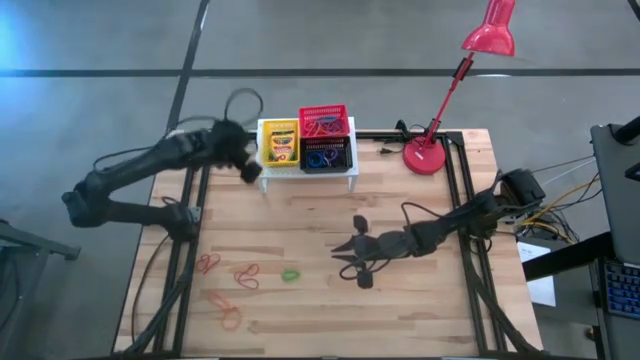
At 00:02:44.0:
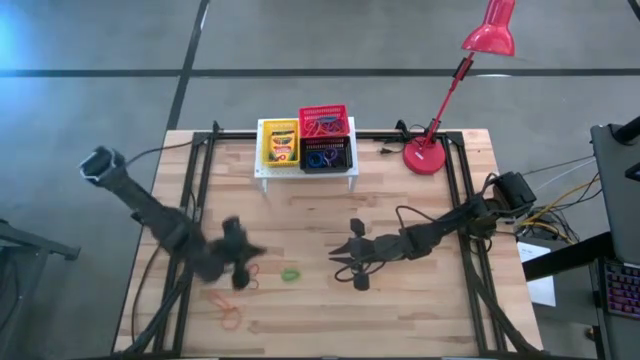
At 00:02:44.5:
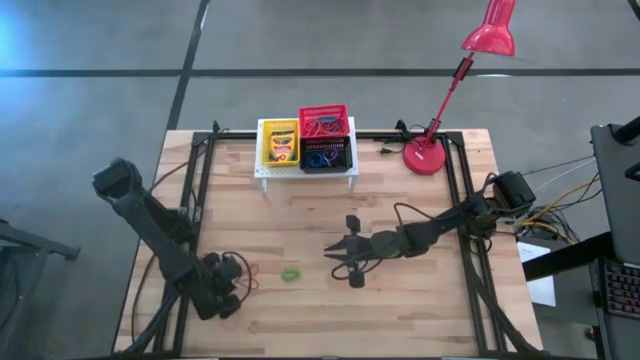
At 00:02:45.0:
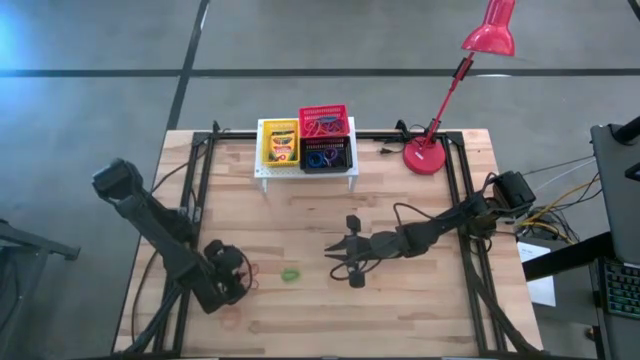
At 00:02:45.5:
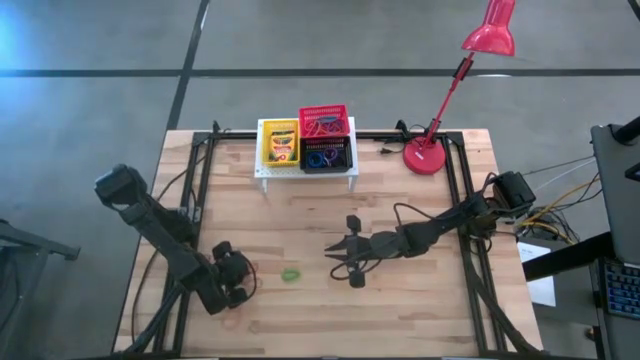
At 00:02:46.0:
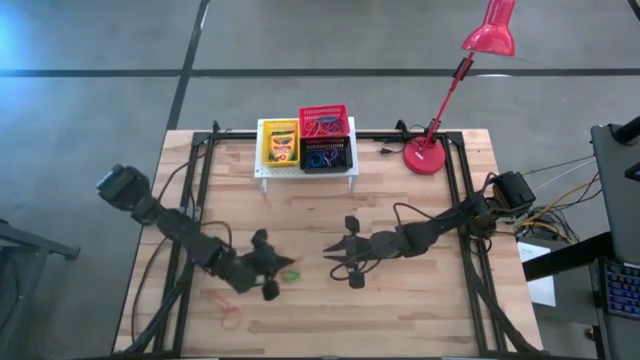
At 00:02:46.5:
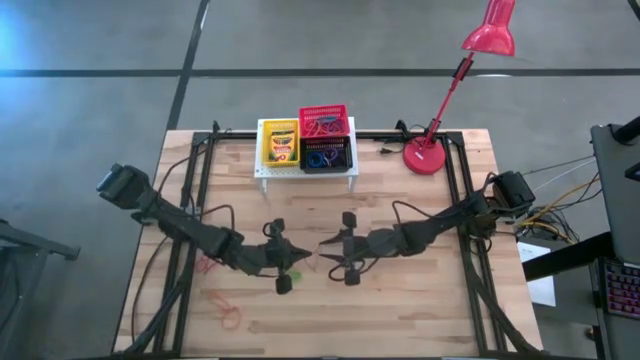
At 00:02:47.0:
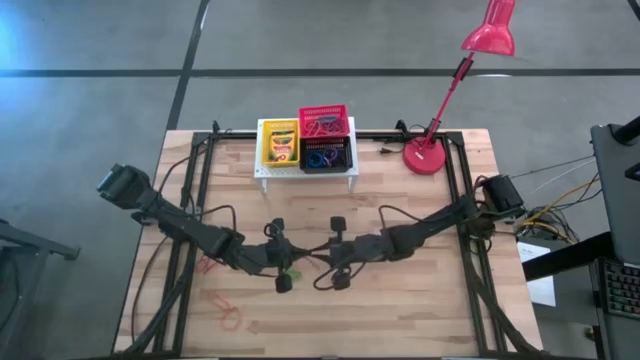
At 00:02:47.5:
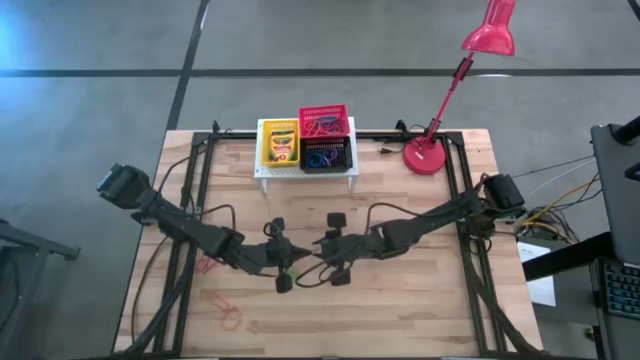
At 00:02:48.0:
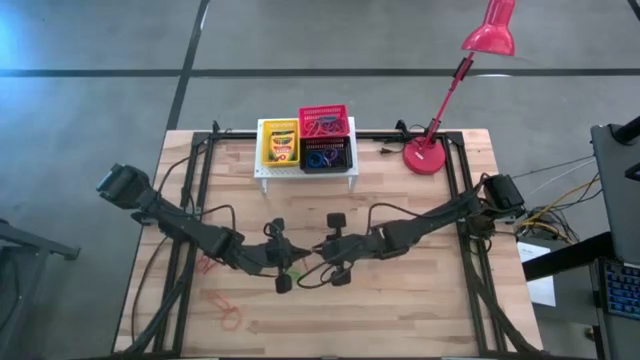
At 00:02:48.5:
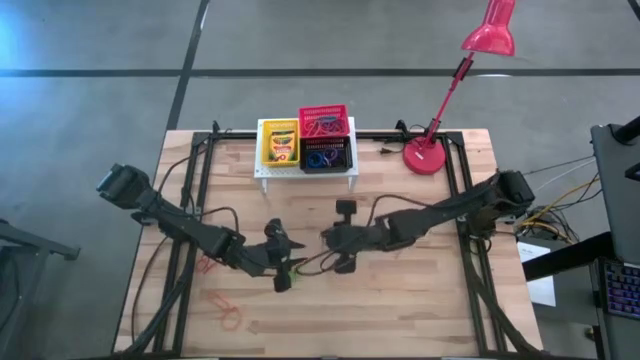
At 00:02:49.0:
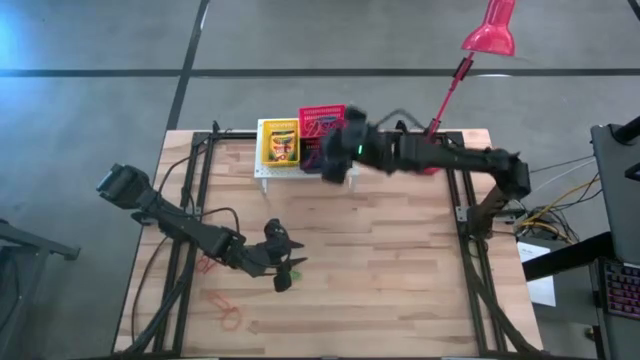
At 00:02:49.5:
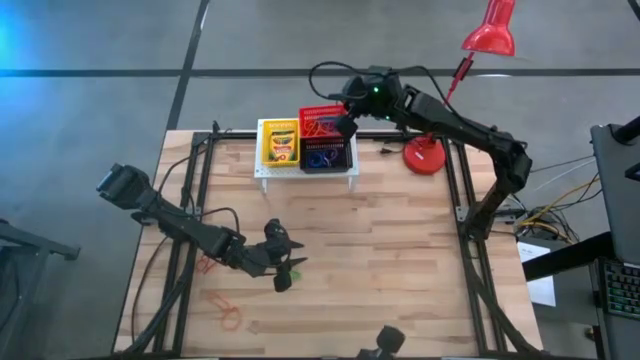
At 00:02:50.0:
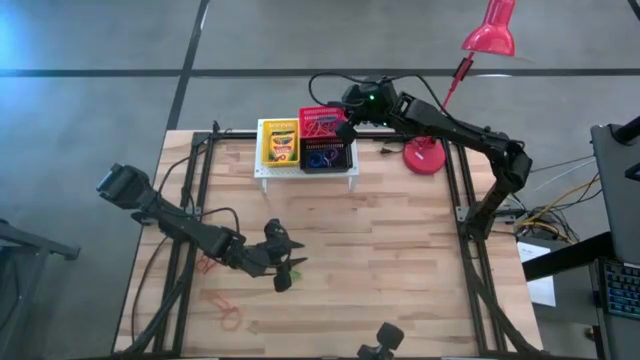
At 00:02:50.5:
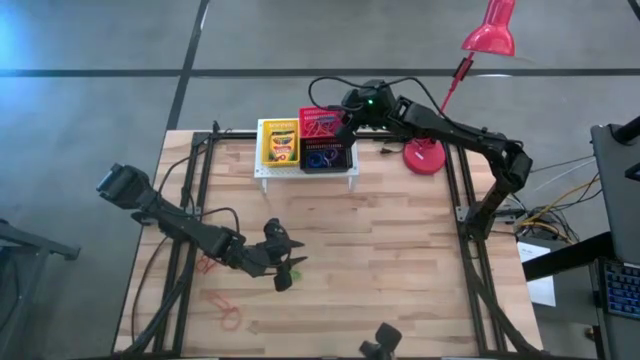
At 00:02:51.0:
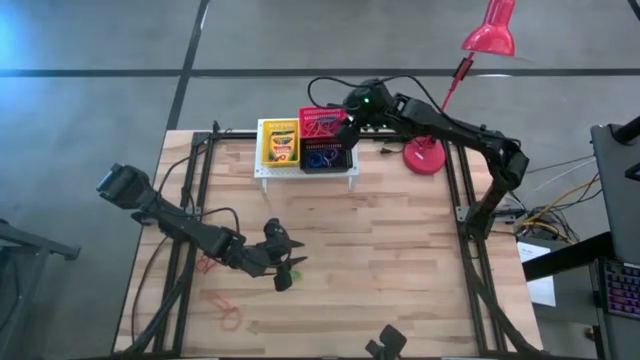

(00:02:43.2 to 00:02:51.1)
Task: Pick & Place Office Desk Supplies
Put the red rubber band into the red bin

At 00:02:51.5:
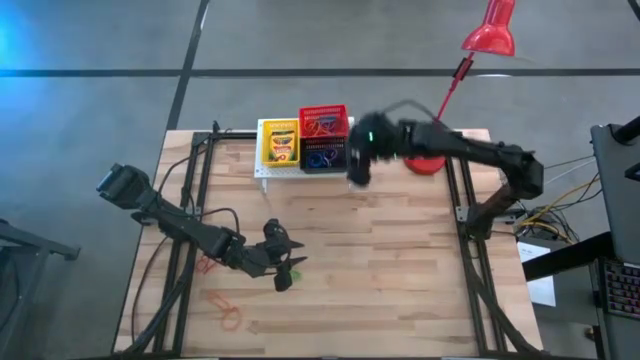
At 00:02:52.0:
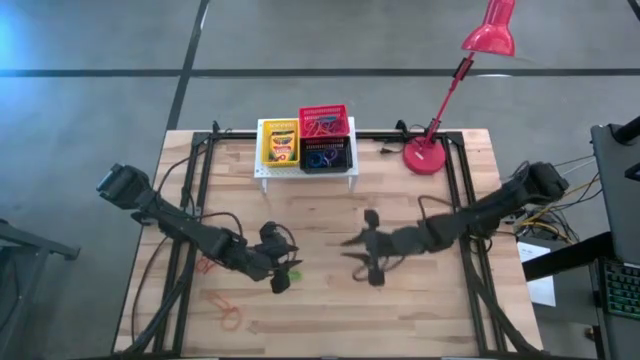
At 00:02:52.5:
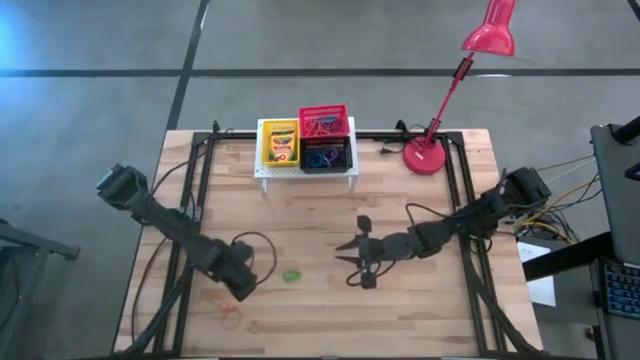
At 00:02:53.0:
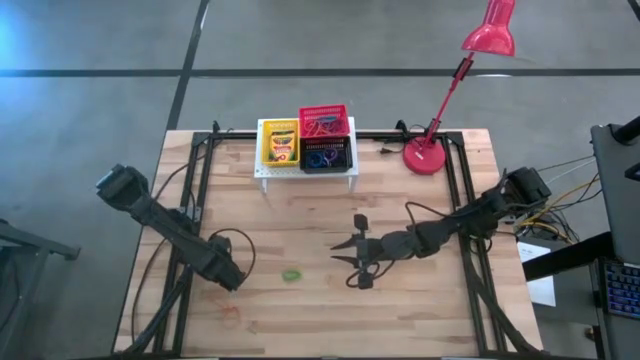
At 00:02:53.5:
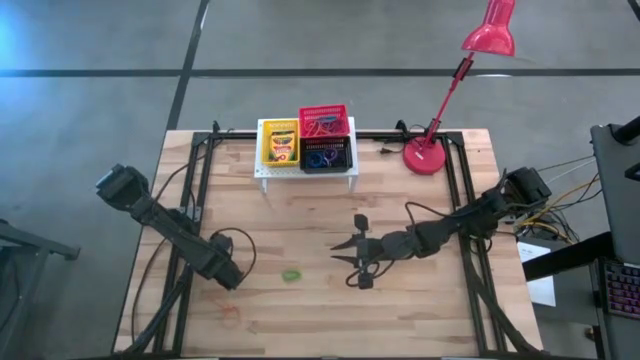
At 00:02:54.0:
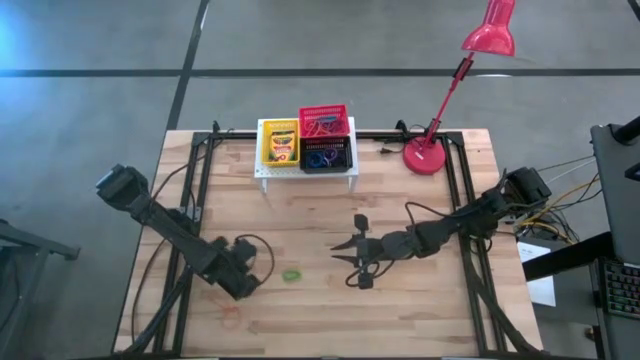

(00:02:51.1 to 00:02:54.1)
Put the red rubber band into the red bin

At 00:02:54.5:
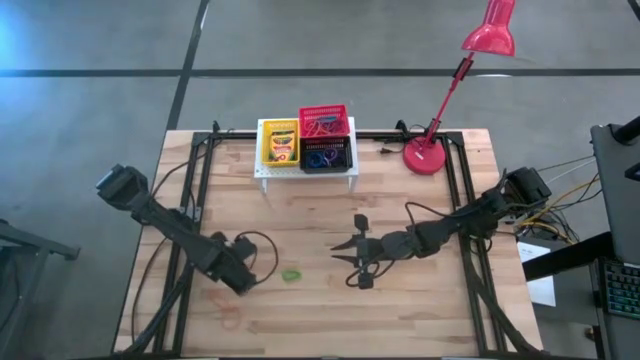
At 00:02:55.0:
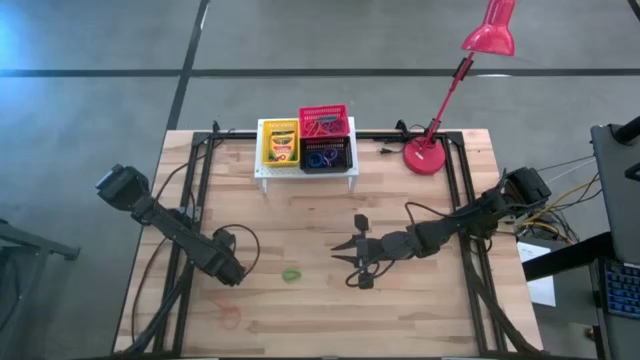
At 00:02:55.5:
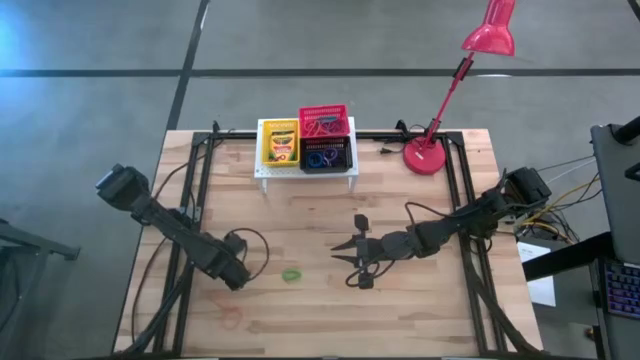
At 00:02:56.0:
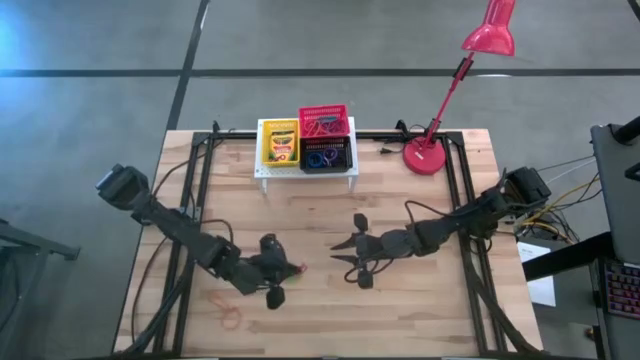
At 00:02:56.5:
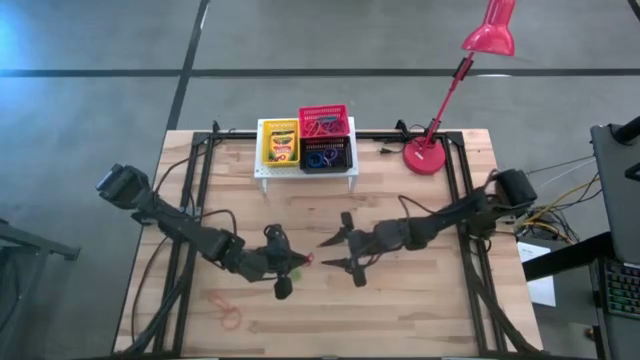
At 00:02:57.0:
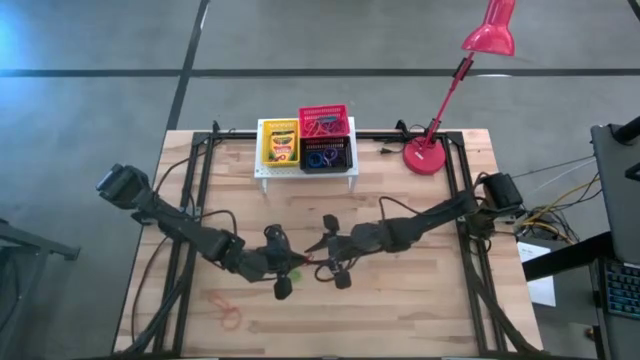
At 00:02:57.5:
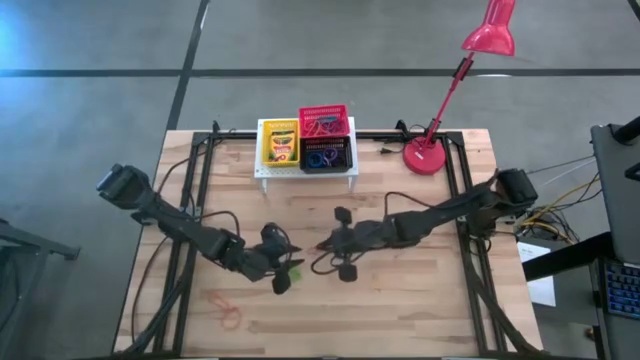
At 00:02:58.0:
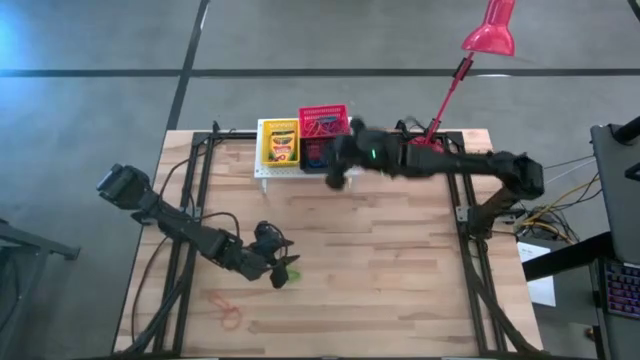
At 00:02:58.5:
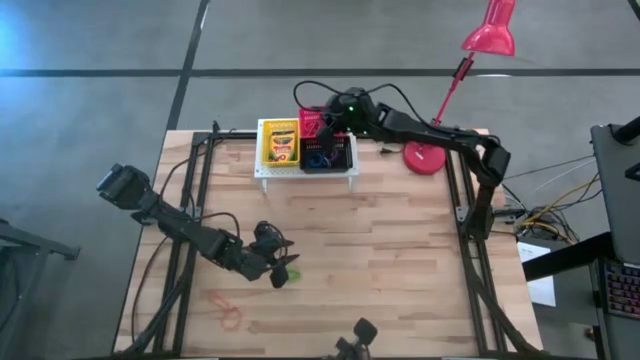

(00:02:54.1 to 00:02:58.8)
Put the red rubber band into the red bin

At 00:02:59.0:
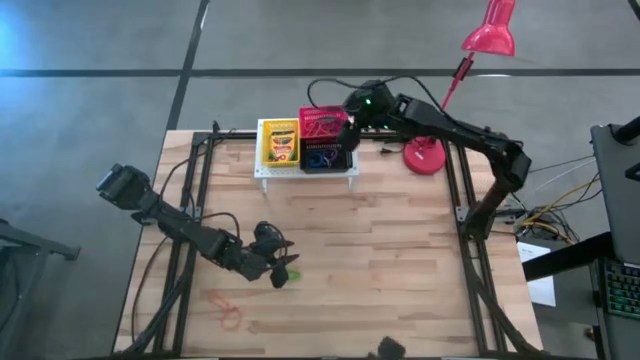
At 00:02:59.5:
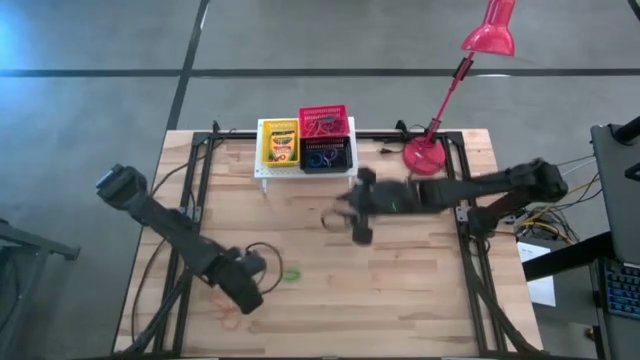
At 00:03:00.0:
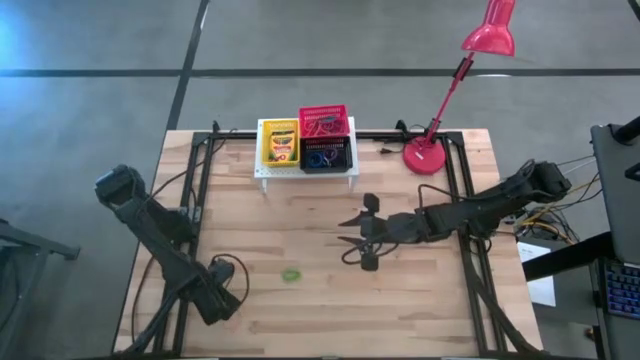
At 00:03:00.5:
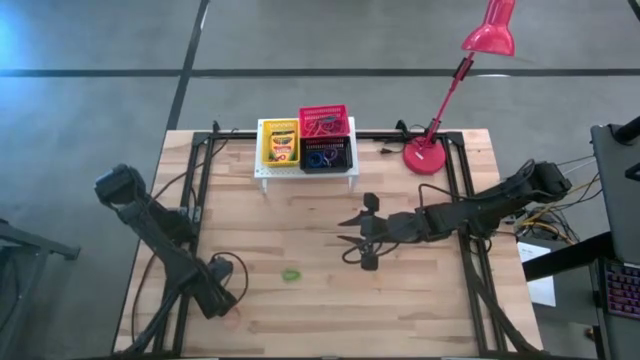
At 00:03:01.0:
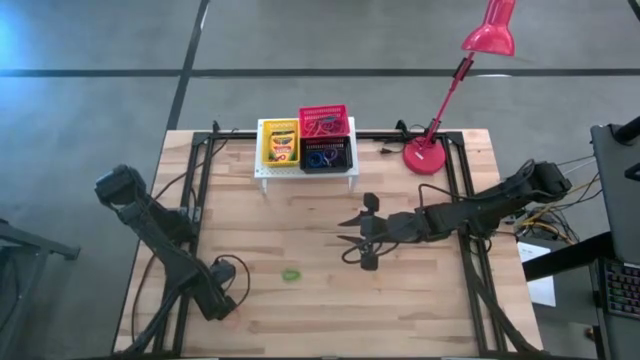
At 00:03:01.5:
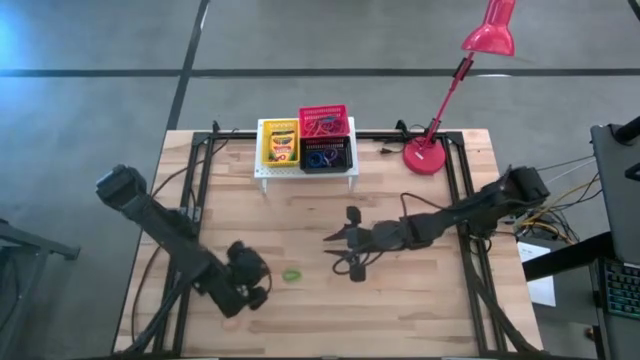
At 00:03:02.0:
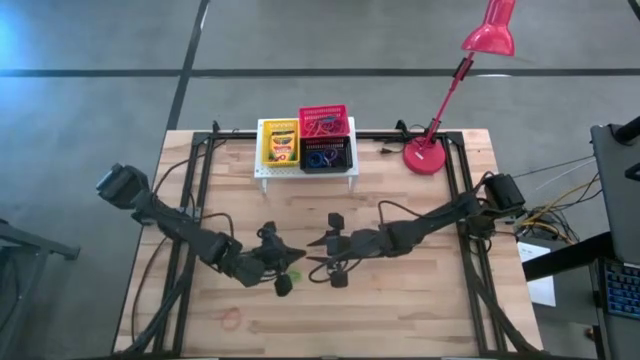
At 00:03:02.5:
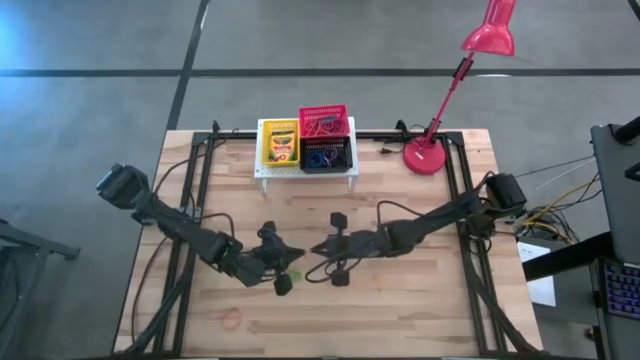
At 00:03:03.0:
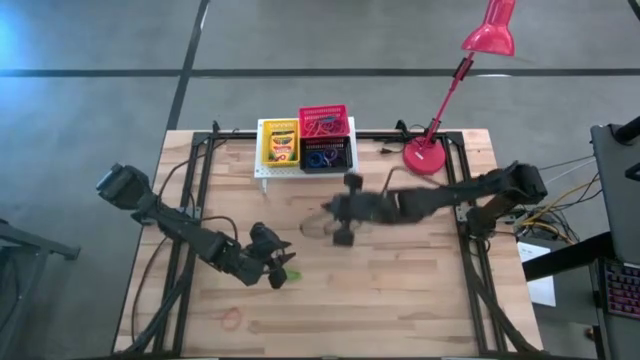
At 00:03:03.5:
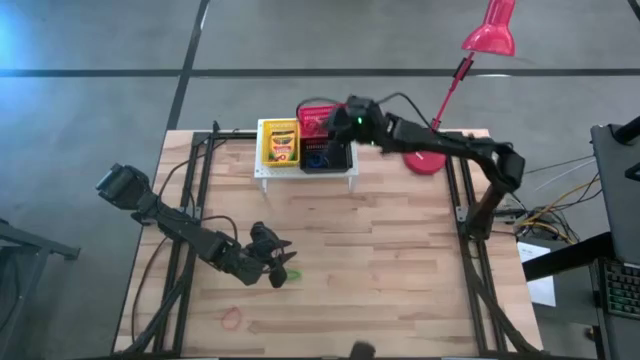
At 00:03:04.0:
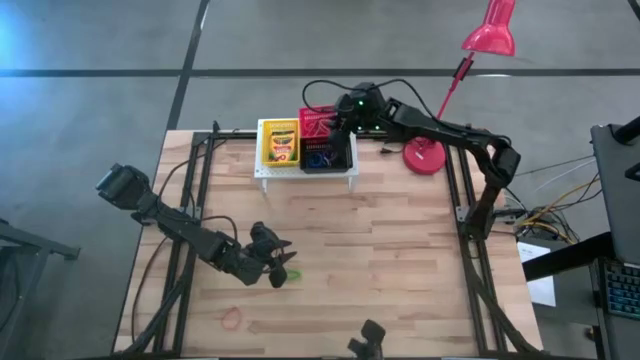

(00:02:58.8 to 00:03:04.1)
Put the orange rubber band into the red bin

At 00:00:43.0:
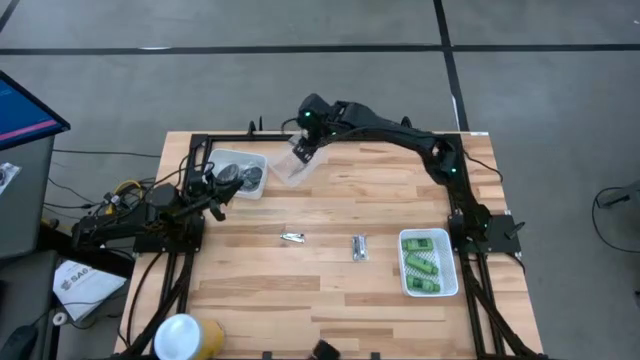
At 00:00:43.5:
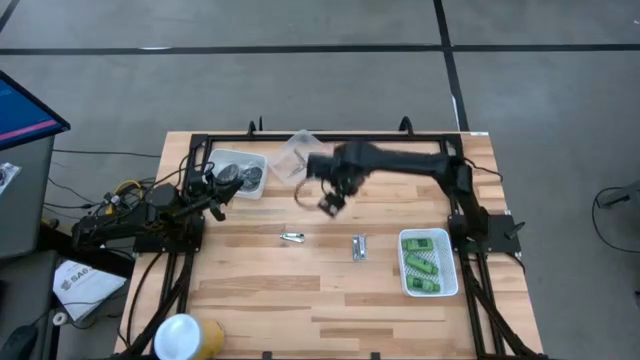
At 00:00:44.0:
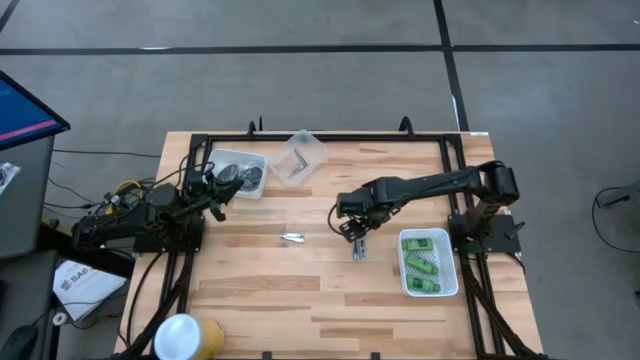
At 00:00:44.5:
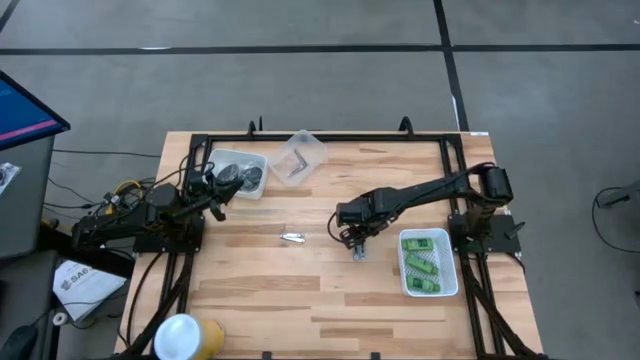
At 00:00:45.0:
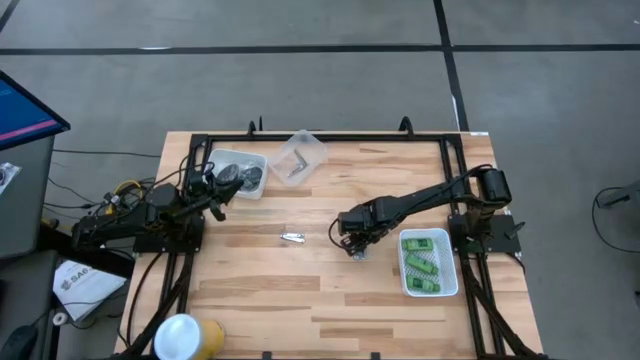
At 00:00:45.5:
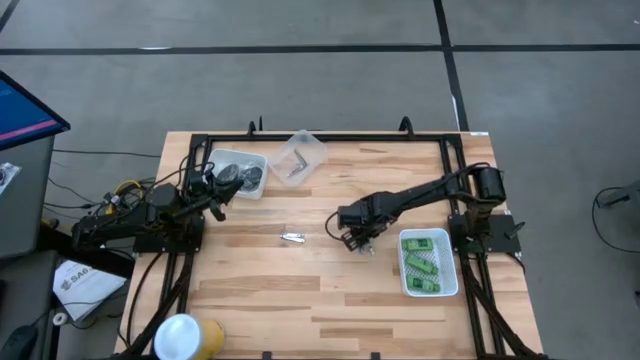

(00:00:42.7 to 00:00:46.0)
Task: Pick & Place Travel size toiletries
Put the silver nail cutter into the transparent bin
